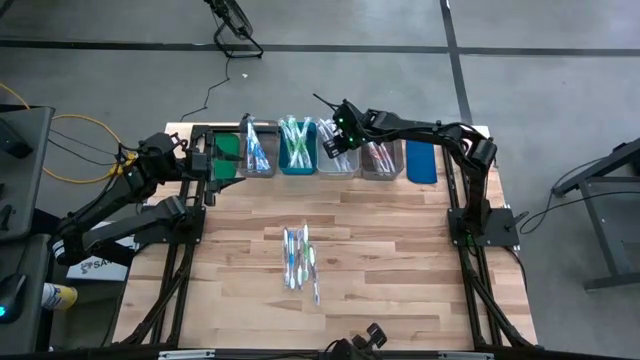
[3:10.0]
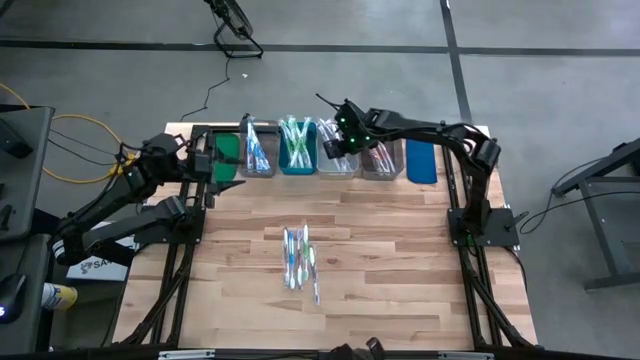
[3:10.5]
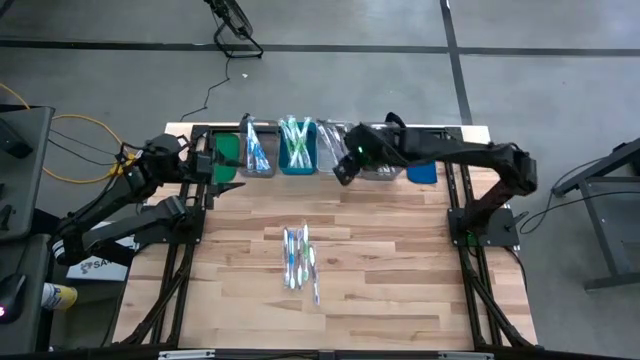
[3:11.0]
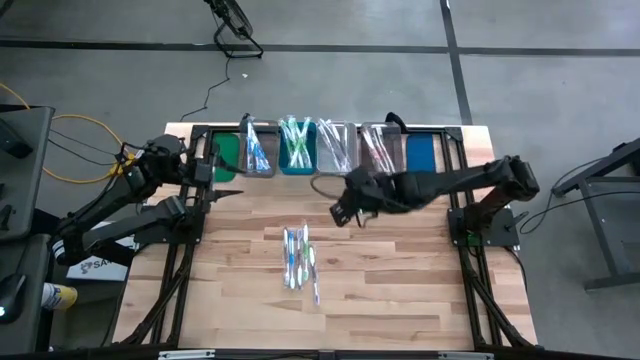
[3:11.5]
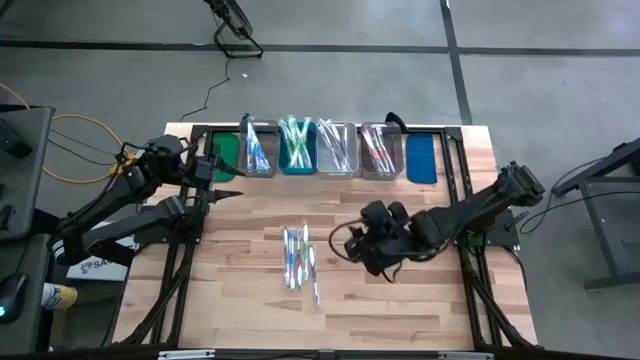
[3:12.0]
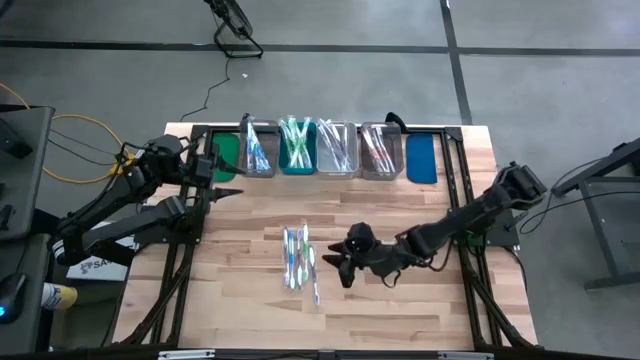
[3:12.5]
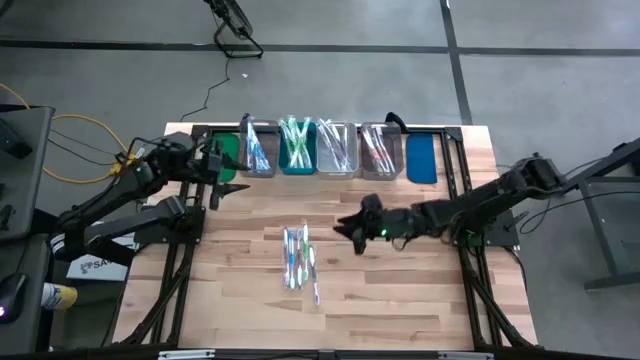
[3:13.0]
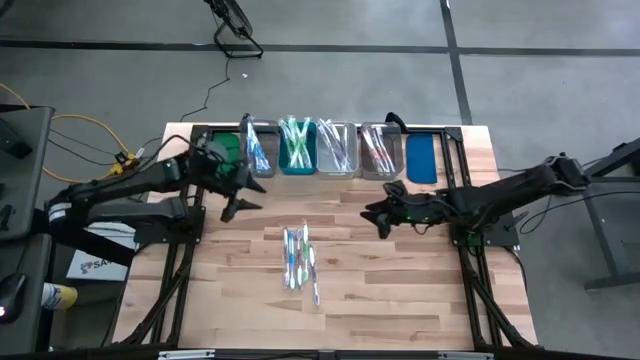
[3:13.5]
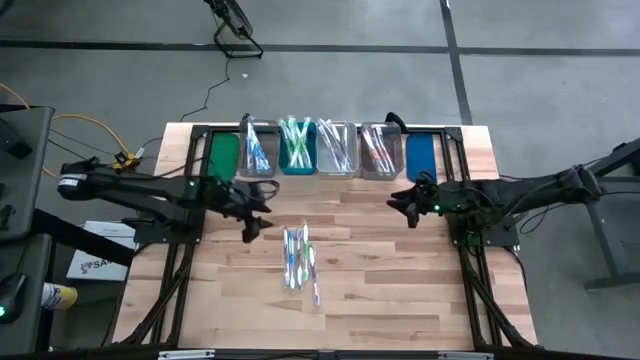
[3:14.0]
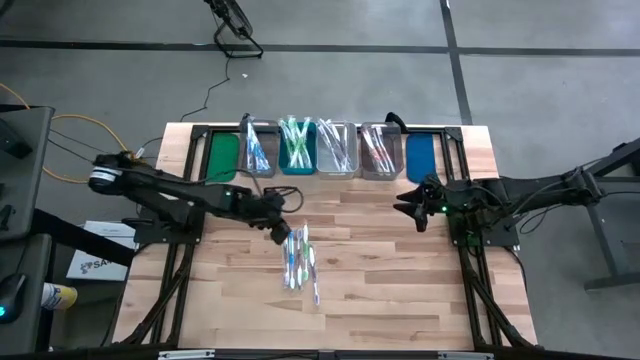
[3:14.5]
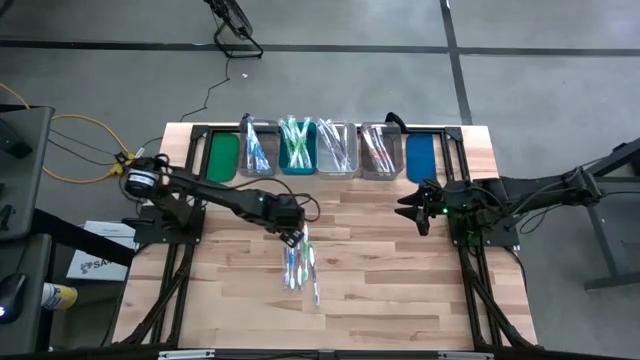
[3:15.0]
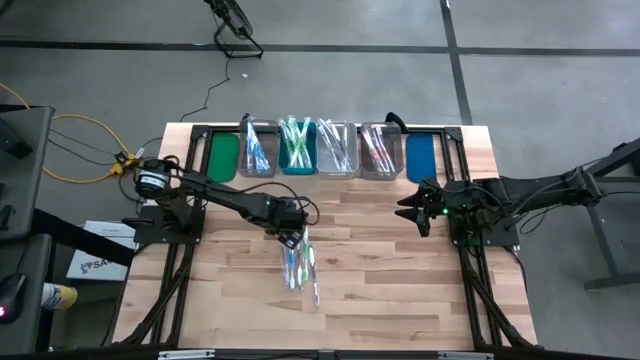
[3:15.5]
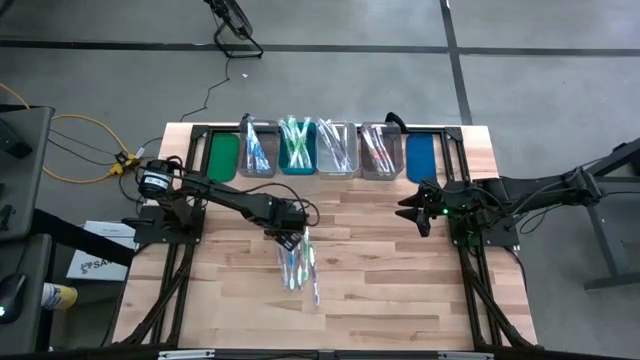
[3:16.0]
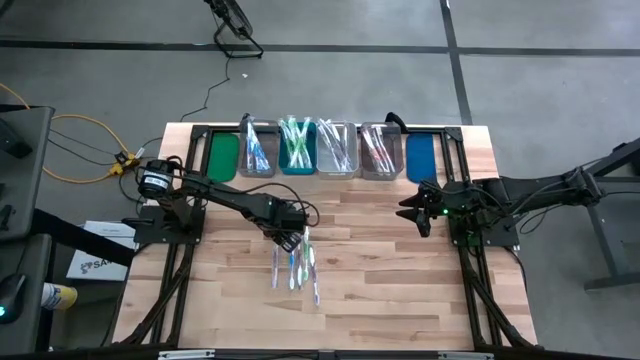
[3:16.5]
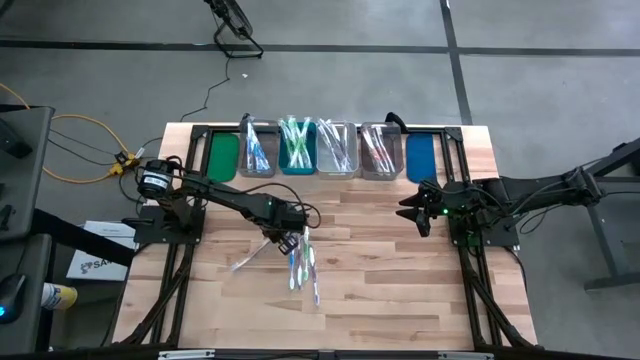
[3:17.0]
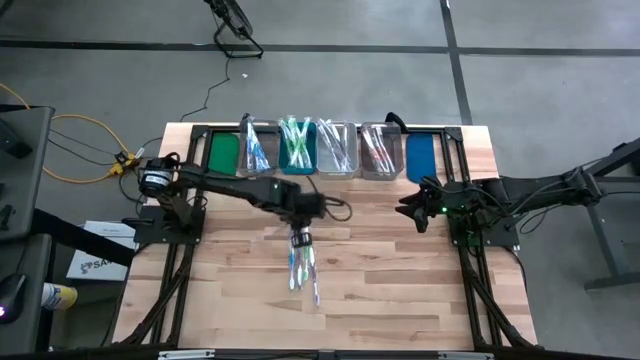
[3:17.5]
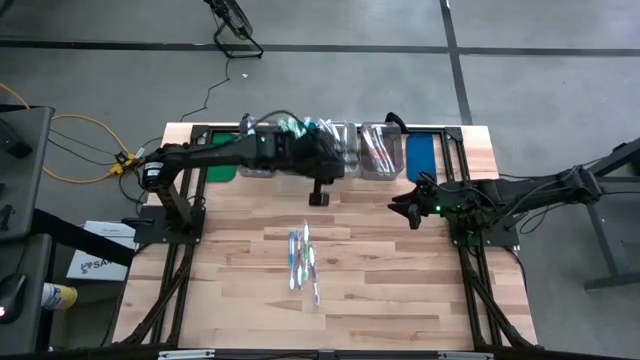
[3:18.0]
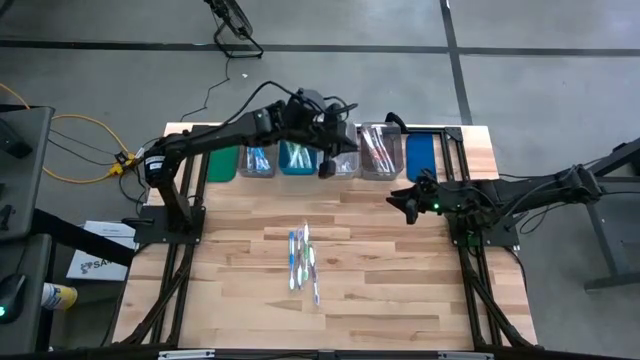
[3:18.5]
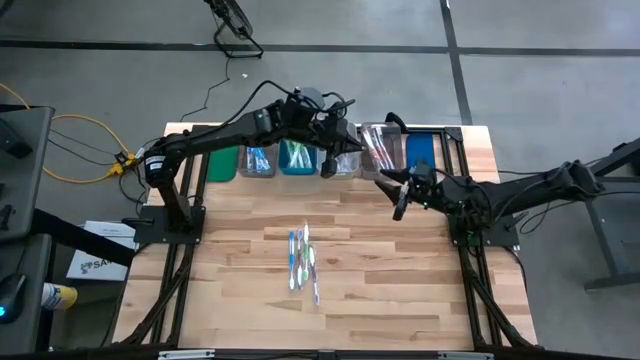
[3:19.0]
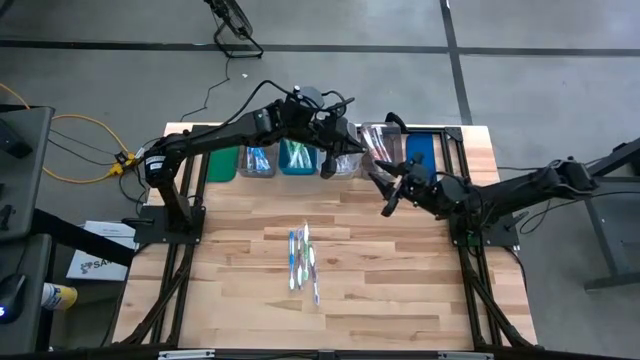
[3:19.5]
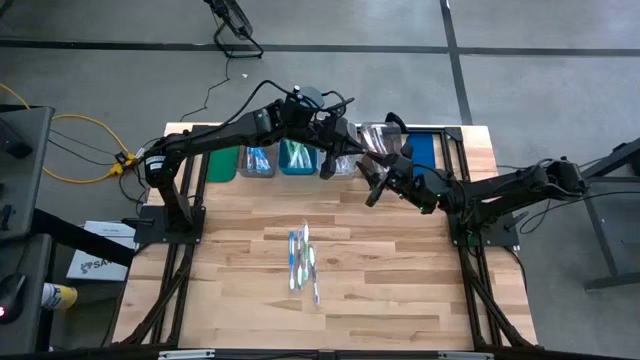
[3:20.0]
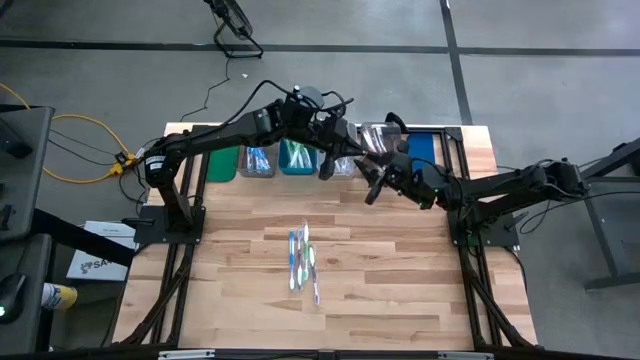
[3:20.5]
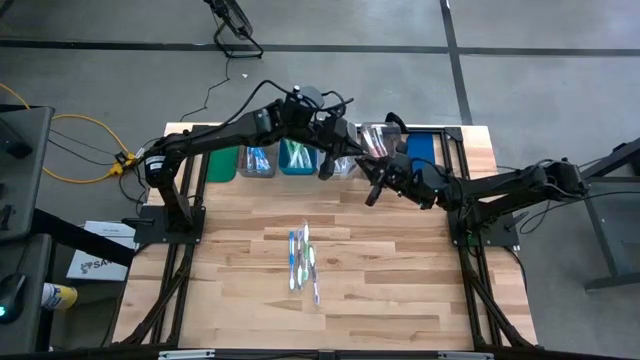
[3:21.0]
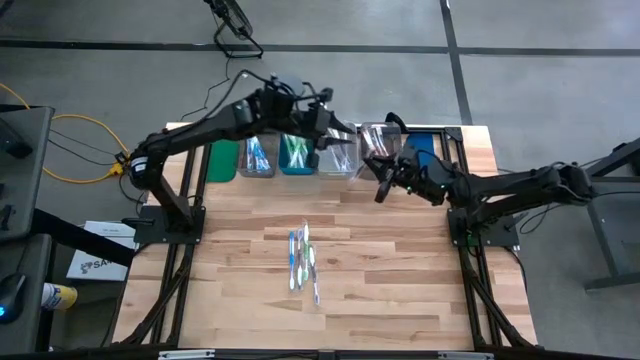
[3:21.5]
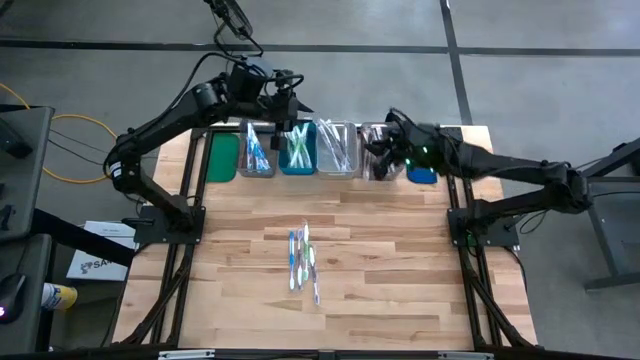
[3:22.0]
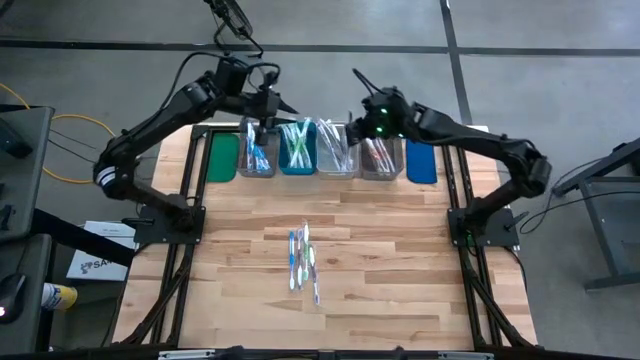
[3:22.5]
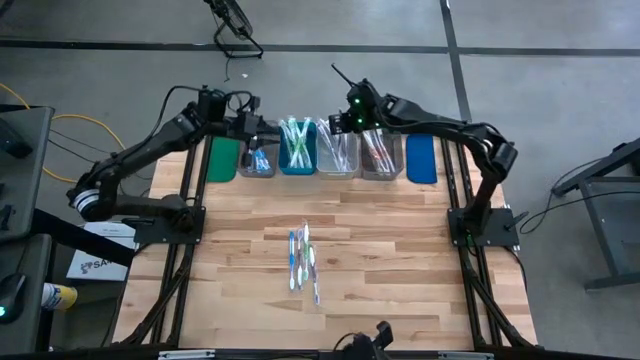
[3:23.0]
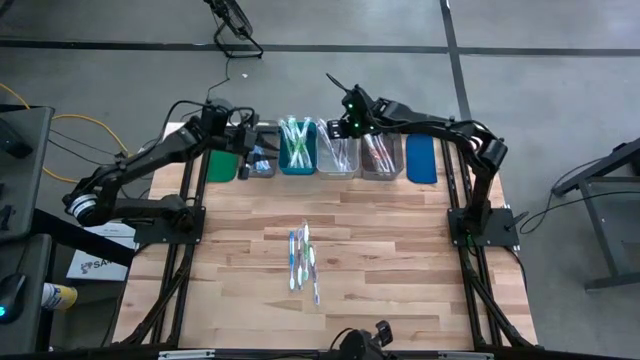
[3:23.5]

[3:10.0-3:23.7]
Task: Pick & Place Toothbrushes
Put the purple toothbrush into the white bin

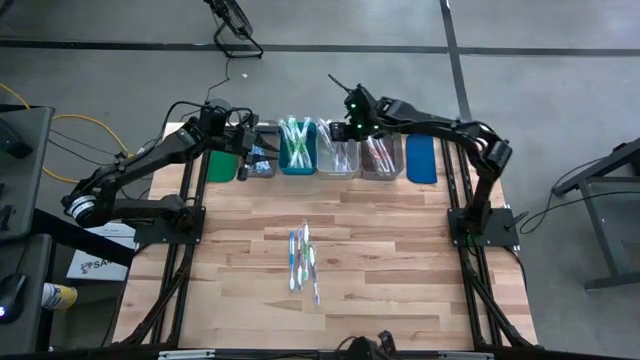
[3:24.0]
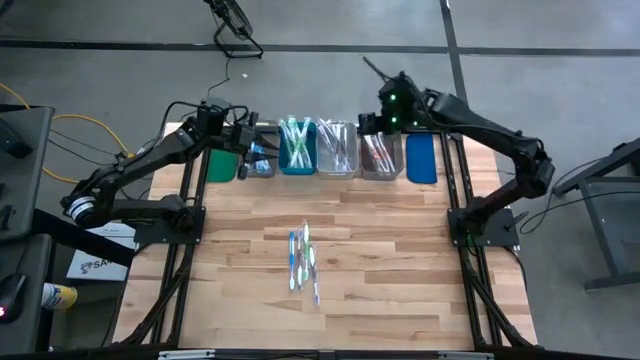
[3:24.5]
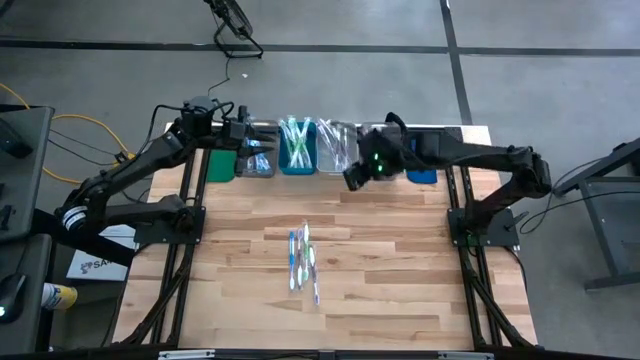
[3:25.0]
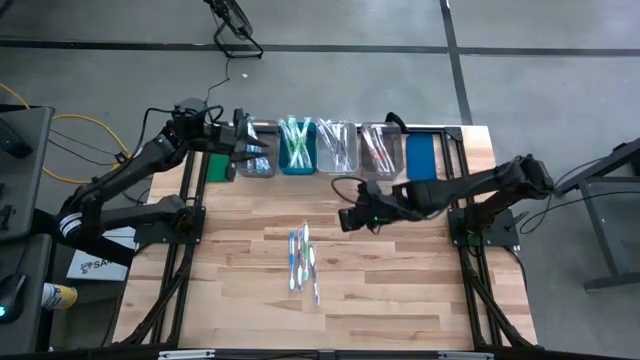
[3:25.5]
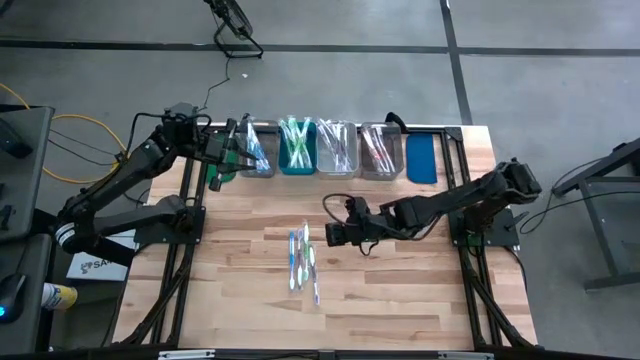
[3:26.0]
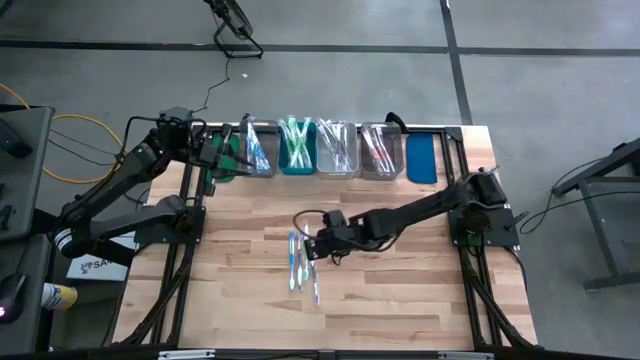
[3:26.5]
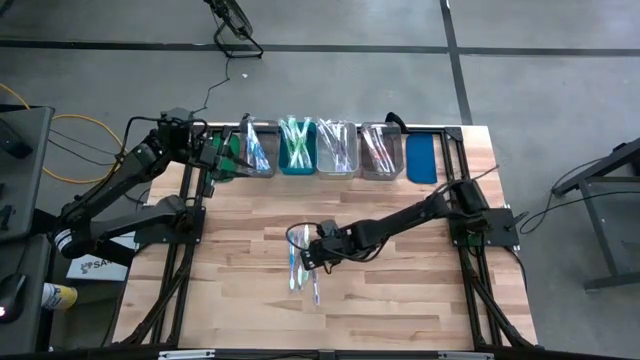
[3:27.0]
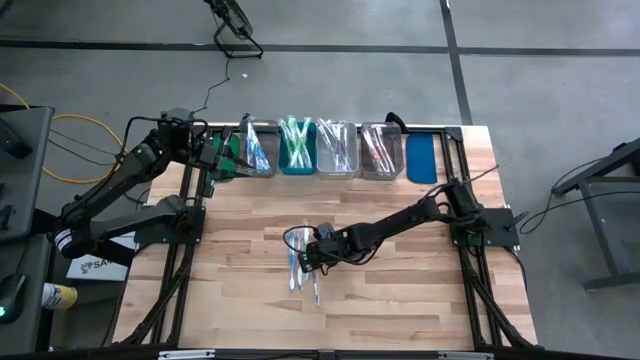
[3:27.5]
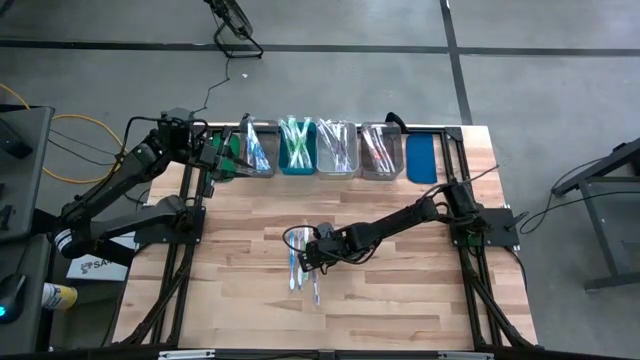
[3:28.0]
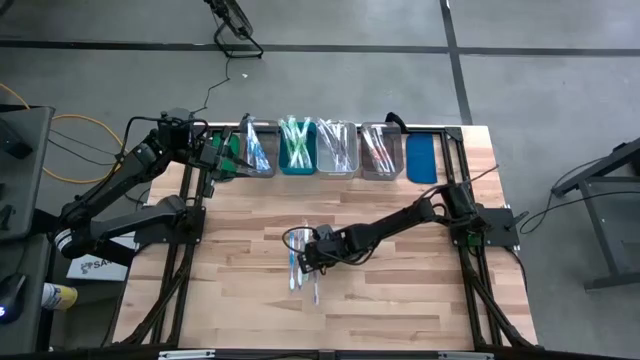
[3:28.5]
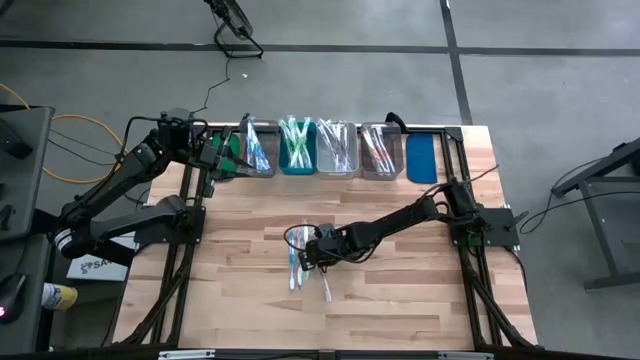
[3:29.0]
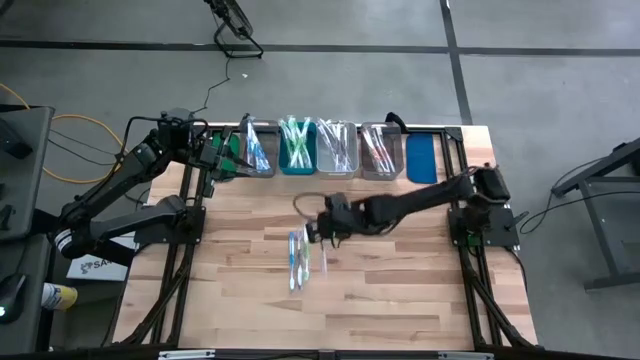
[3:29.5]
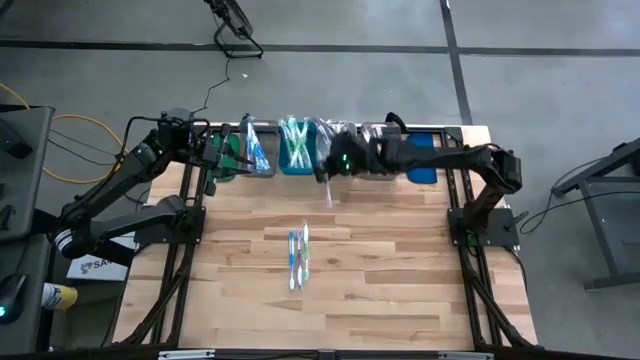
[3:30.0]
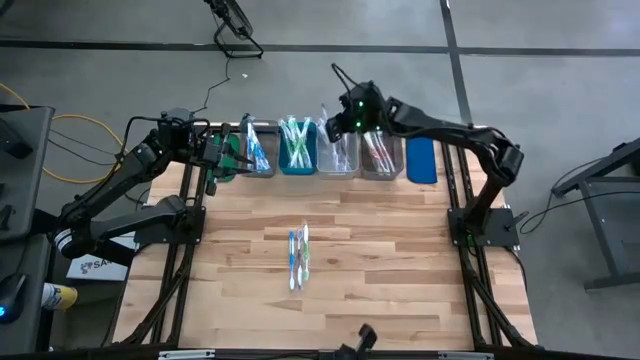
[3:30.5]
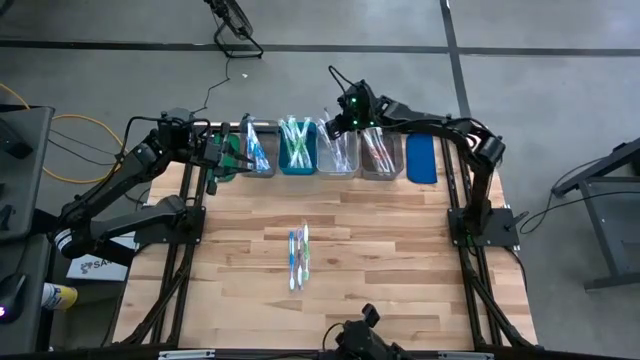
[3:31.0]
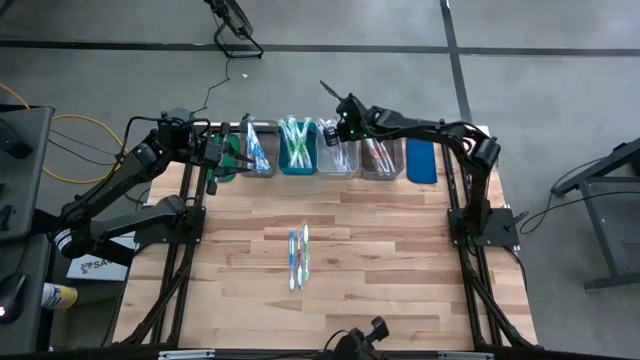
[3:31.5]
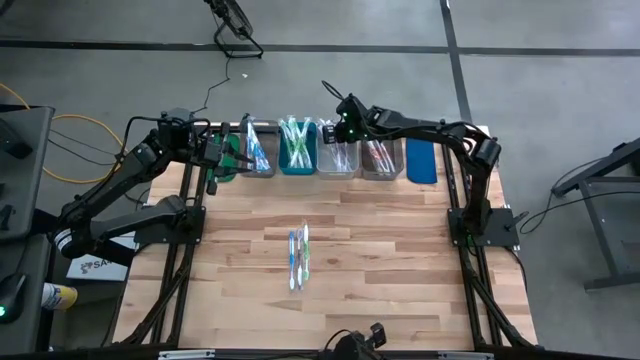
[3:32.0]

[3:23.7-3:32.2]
Put the purple toothbrush into the white bin
